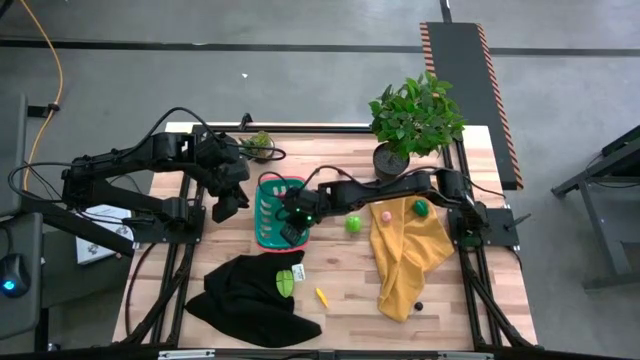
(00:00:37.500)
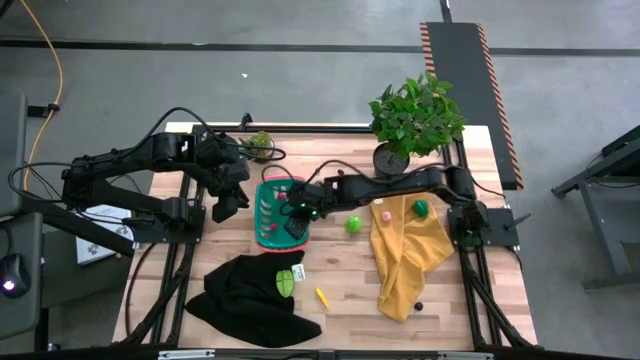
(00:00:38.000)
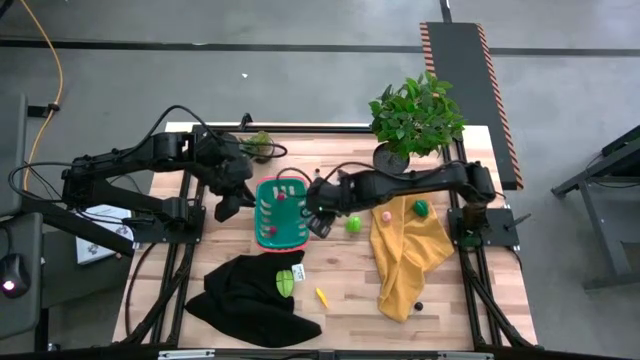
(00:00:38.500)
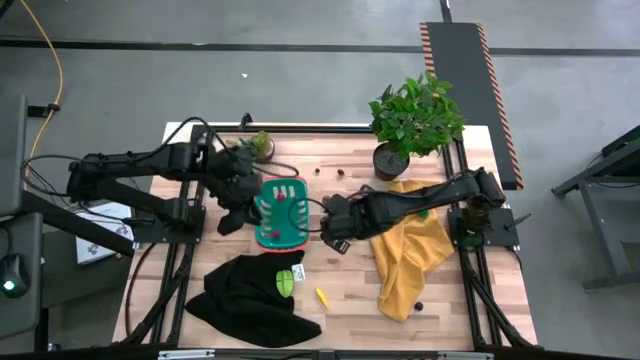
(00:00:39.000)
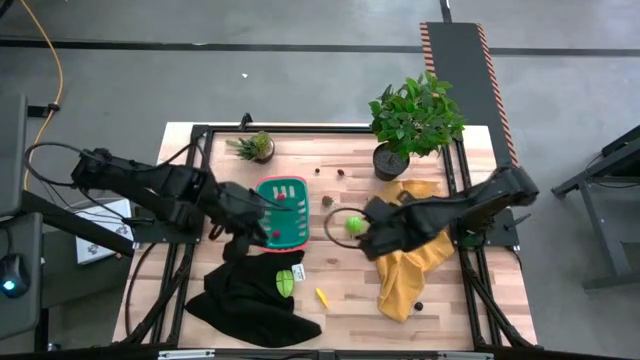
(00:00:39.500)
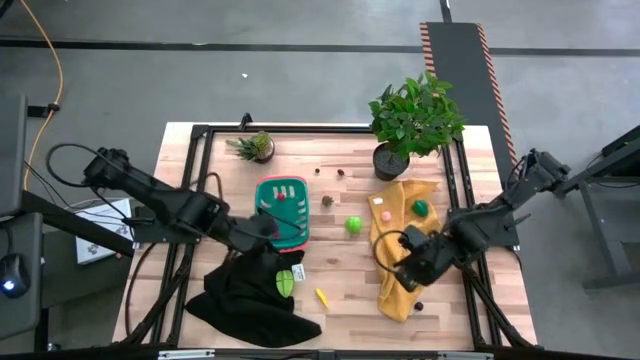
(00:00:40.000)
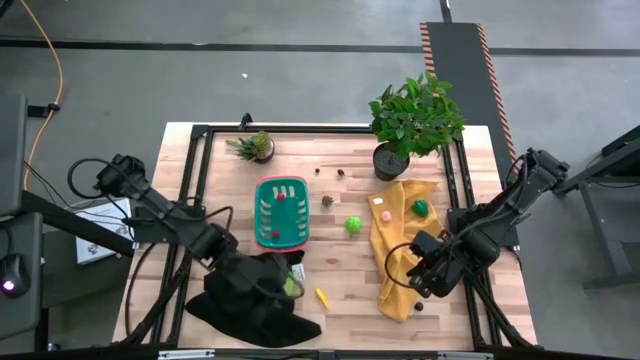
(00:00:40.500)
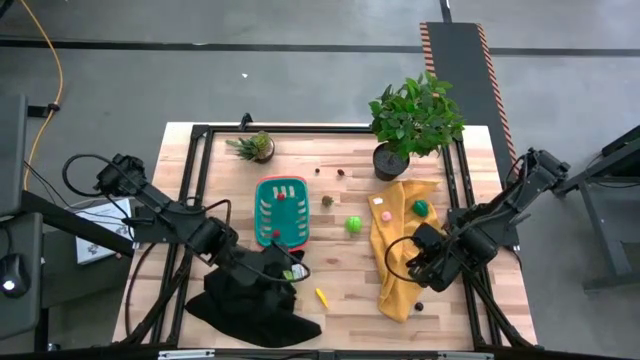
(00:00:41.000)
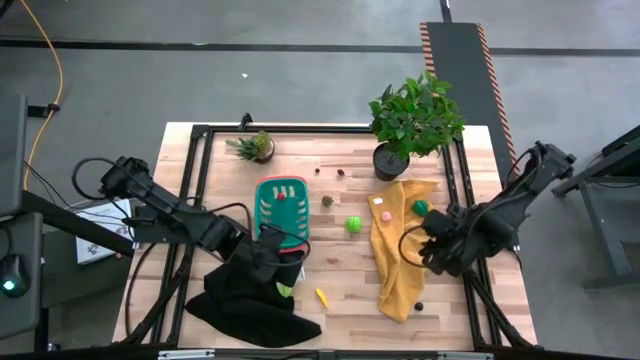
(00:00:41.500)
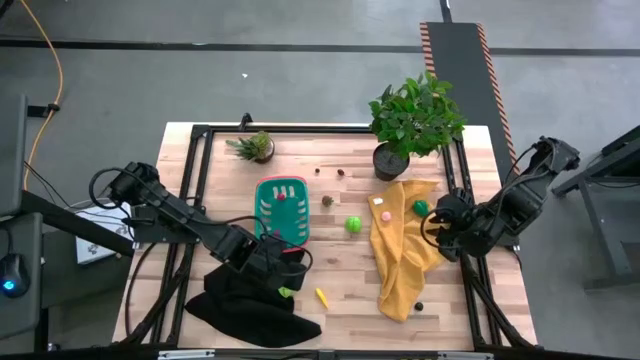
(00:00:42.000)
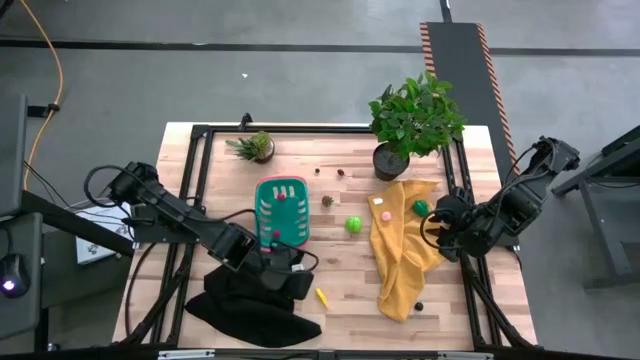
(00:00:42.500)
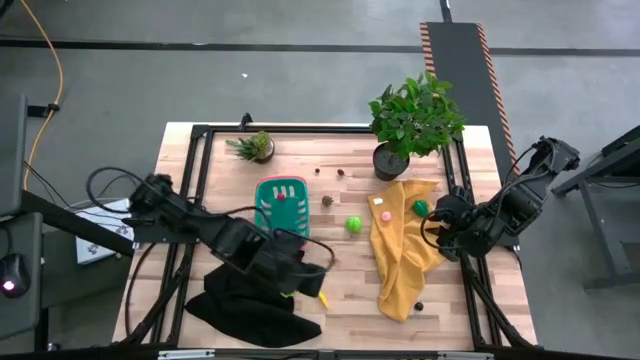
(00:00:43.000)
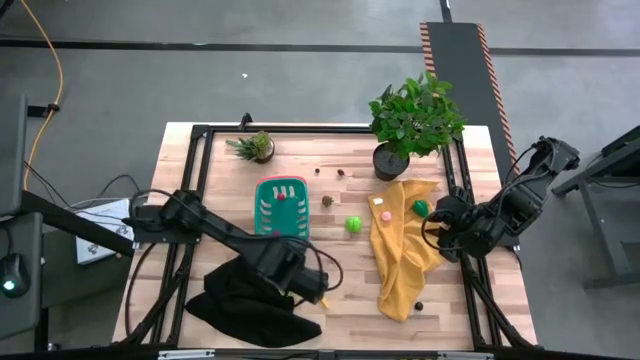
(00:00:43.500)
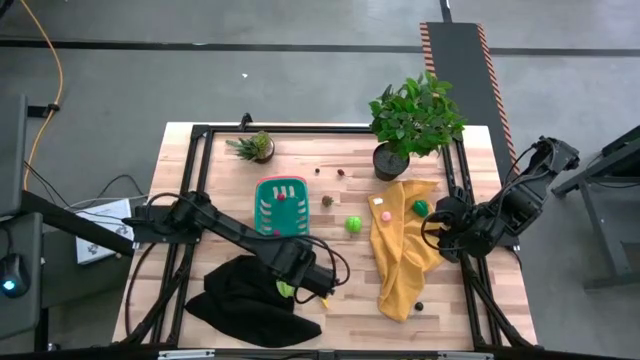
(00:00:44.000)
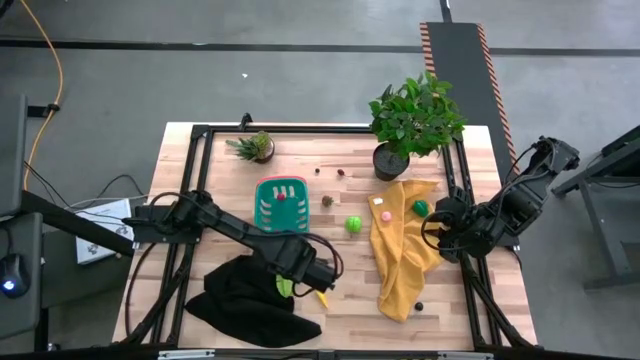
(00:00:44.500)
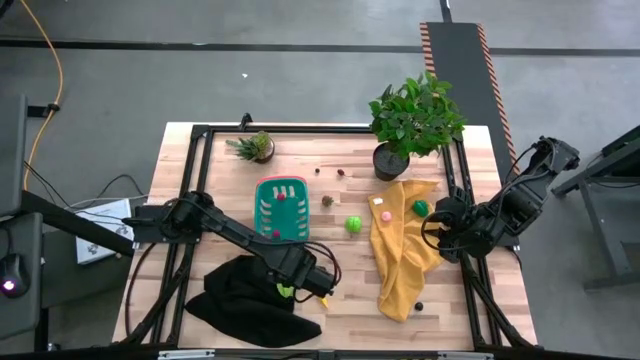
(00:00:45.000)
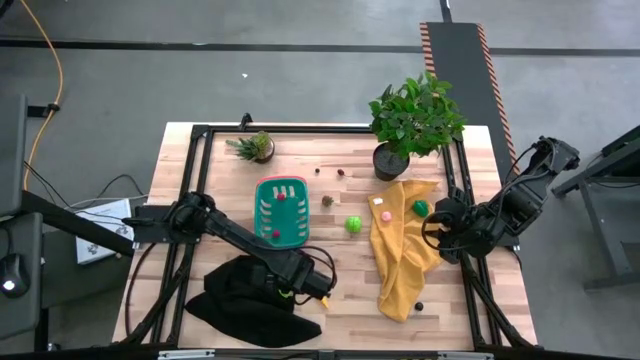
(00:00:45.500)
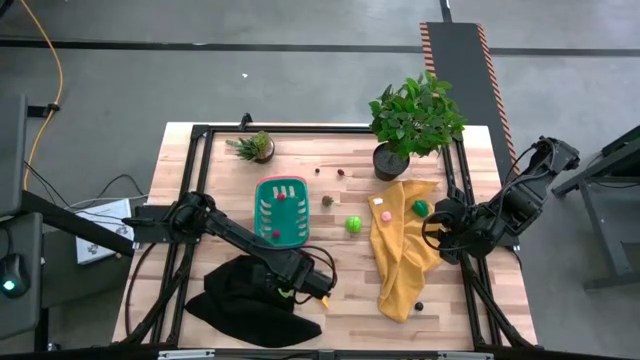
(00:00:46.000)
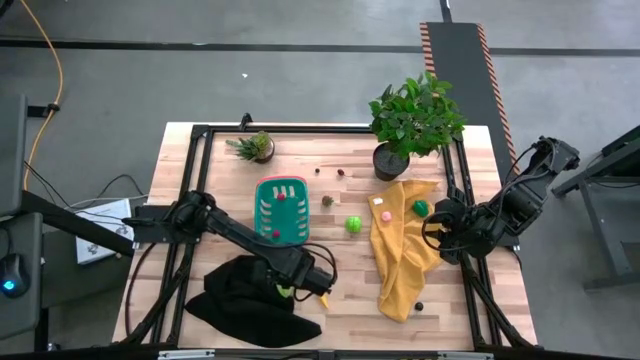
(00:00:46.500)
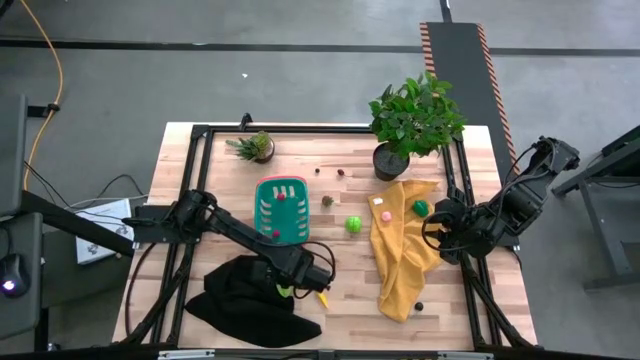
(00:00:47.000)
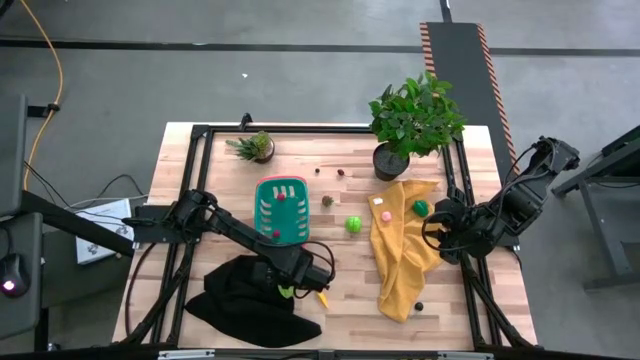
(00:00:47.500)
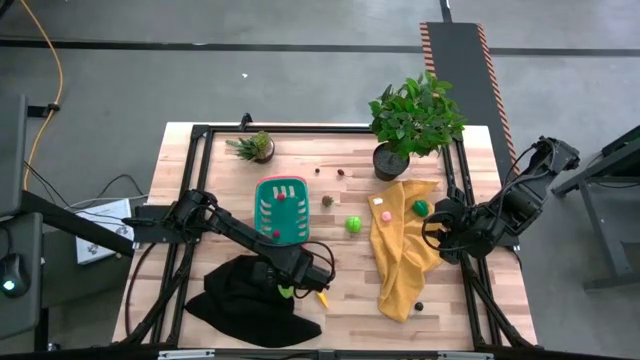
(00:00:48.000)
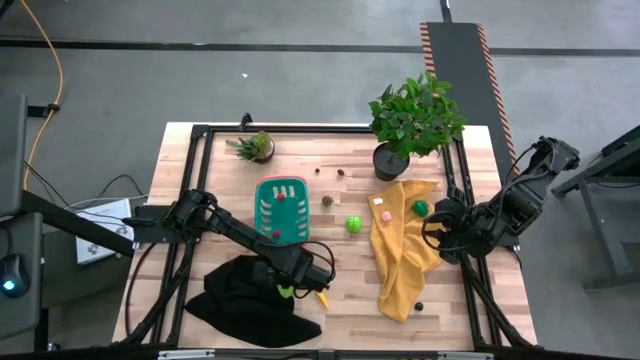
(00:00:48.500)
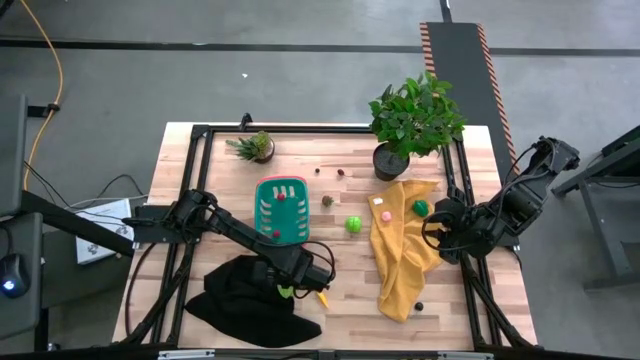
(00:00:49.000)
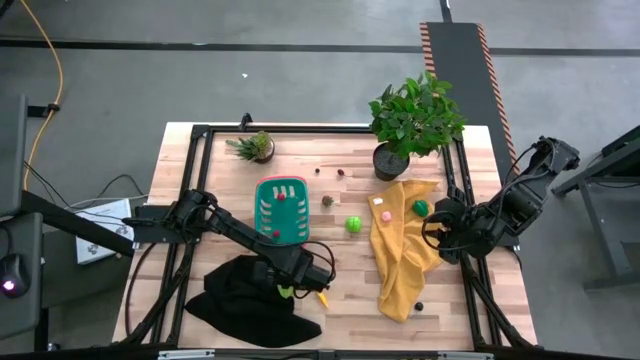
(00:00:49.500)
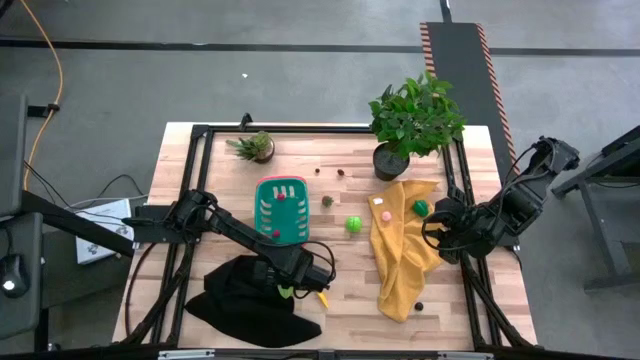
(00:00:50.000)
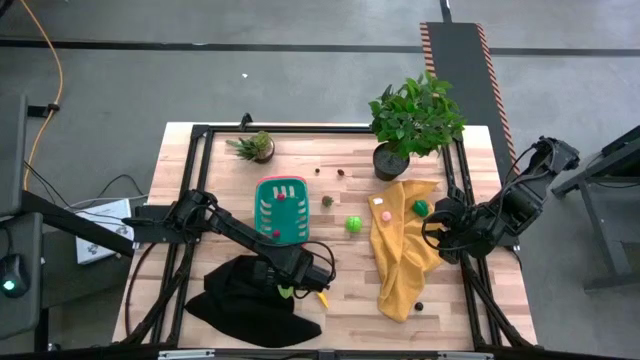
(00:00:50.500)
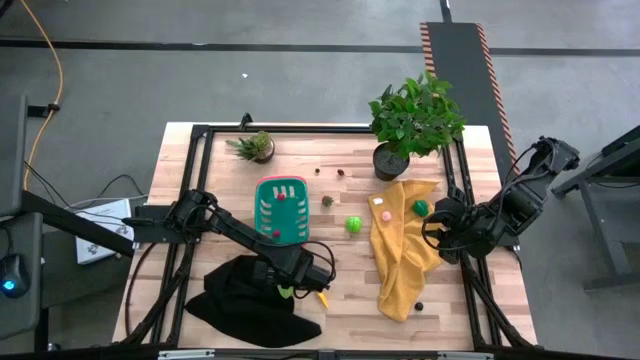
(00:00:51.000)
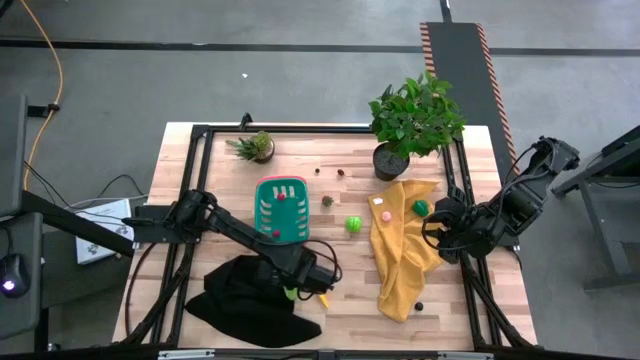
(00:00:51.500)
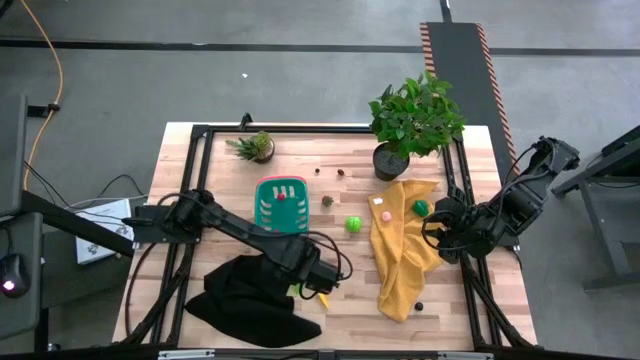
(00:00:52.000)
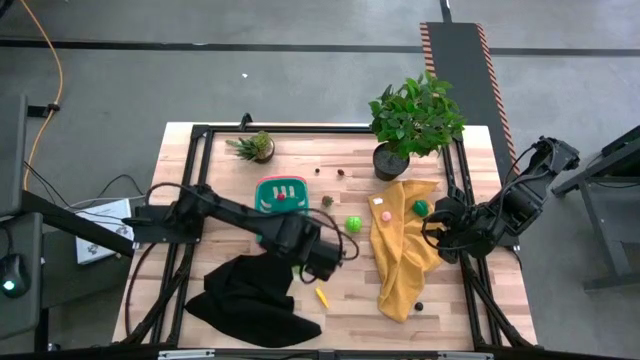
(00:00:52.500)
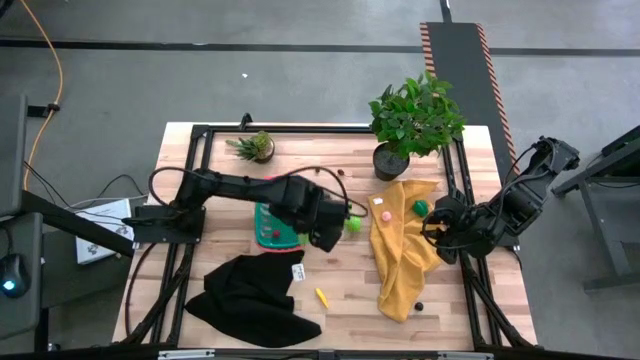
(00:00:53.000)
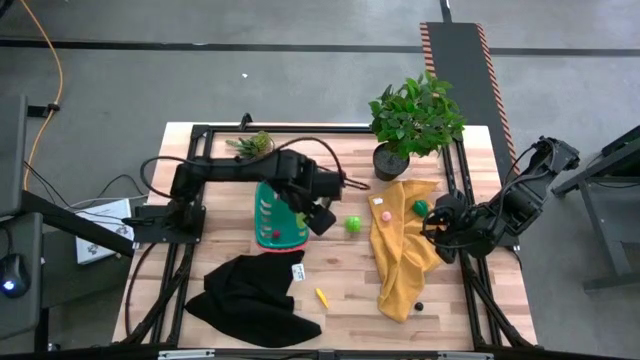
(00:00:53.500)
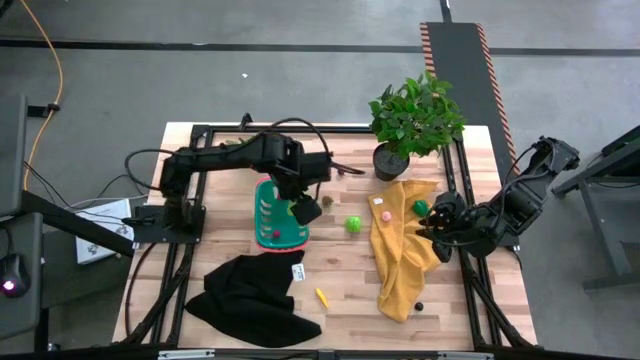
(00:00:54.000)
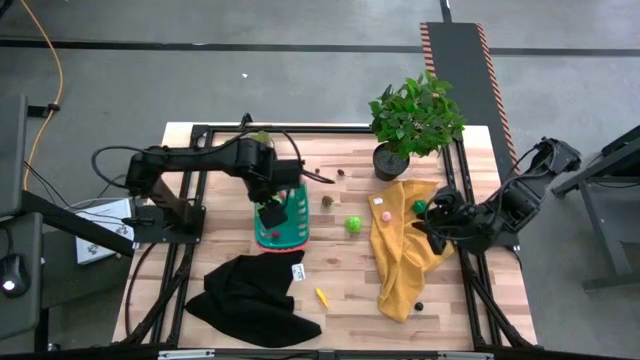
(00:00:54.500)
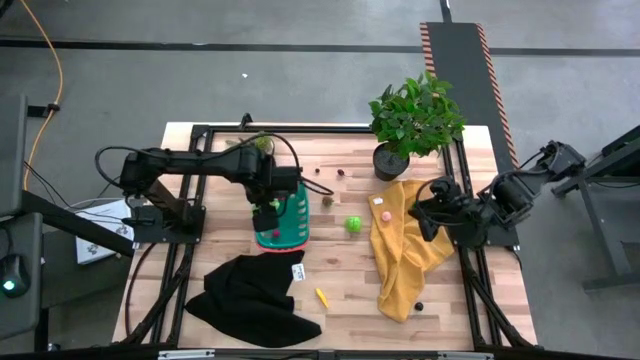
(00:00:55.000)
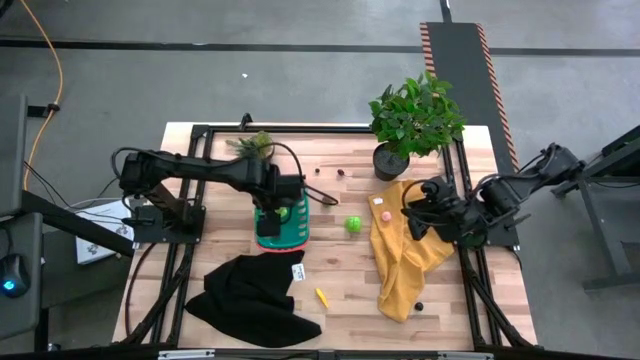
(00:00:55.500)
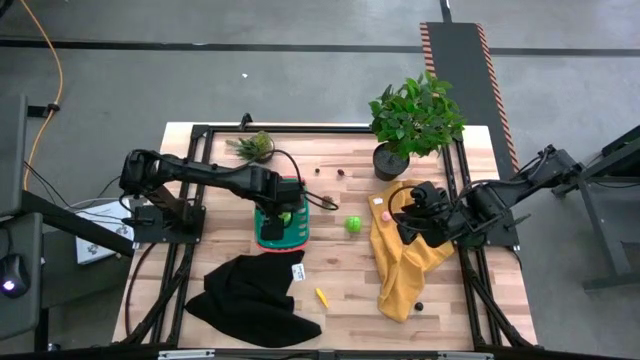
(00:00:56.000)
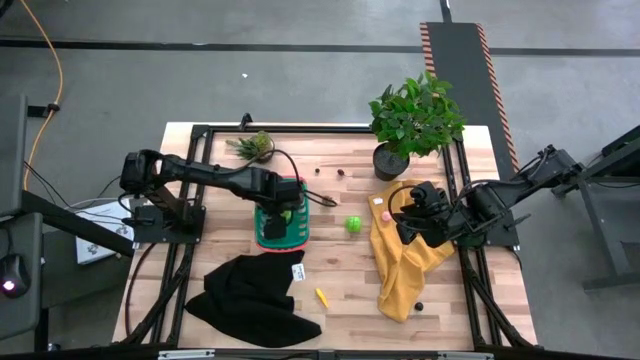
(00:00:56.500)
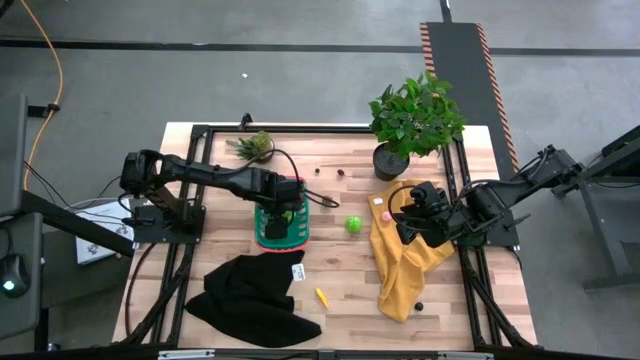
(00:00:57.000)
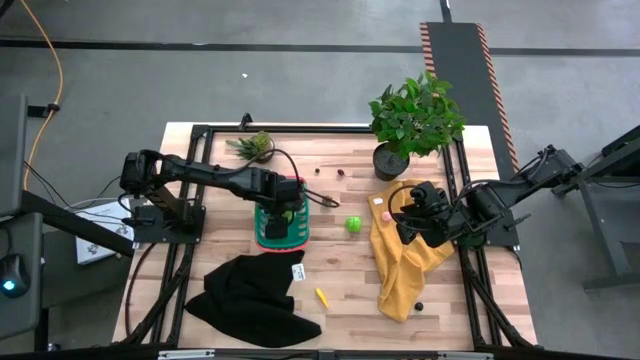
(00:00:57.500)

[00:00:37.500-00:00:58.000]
Task: Pick and placing Produce into tupperware
Put the green starfruit in the green basket
